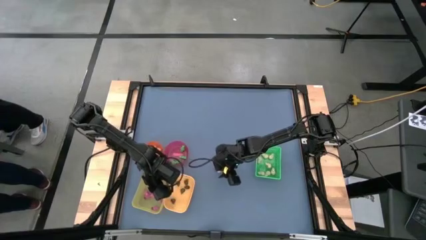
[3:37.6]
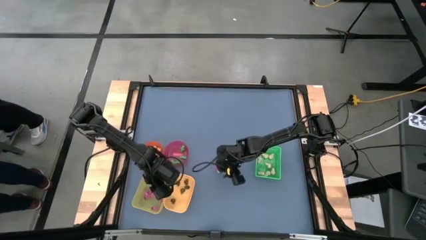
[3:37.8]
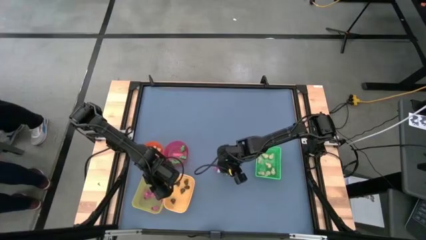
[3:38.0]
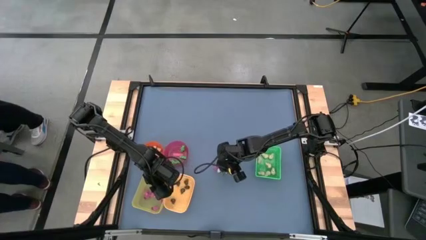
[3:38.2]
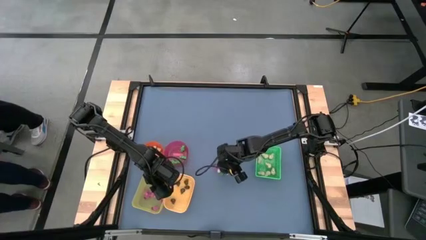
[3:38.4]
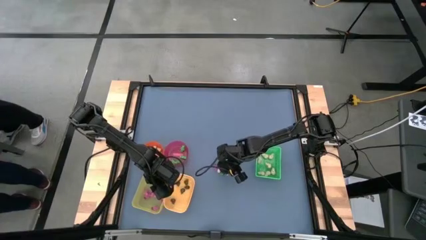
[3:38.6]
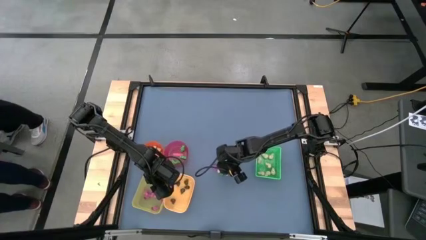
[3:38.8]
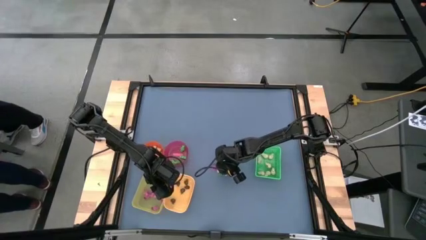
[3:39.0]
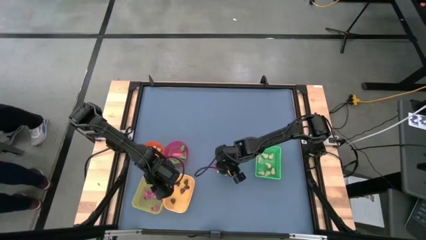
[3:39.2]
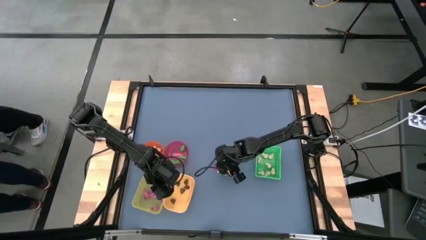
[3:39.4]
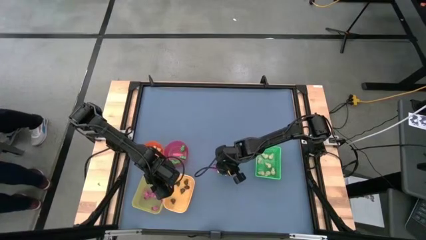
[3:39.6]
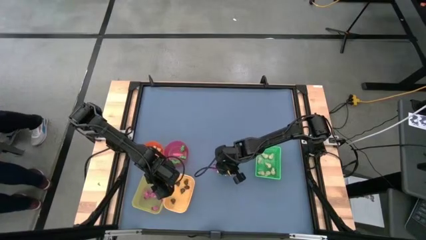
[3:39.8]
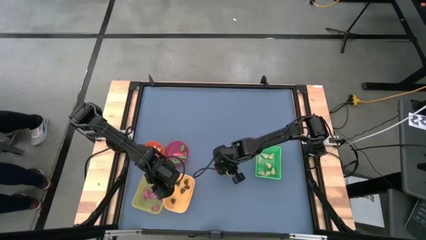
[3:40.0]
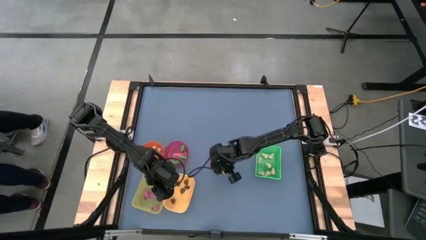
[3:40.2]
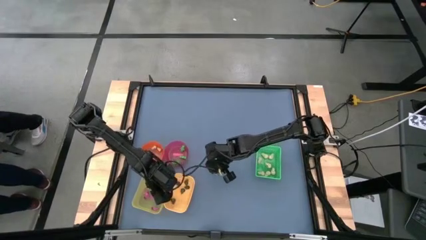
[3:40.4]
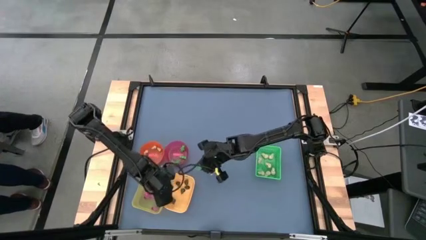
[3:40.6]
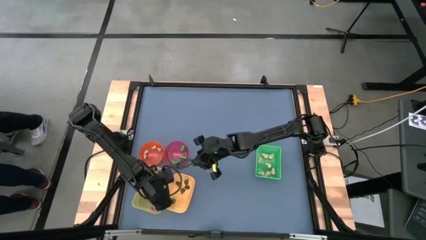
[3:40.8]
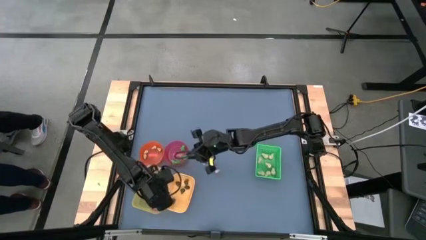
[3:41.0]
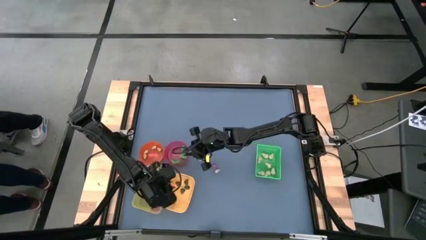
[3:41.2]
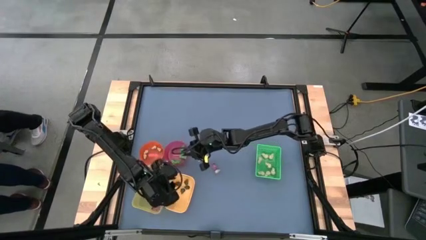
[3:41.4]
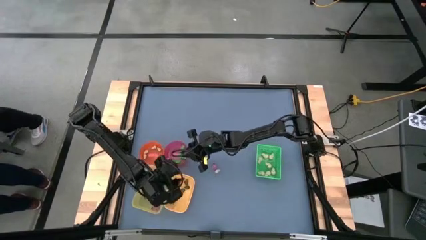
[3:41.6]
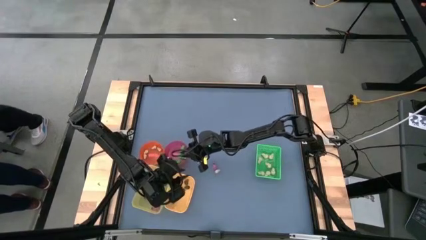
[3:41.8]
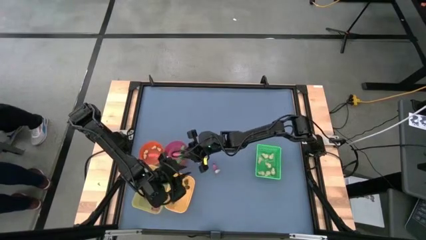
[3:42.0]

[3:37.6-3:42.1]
Task: Sort Halloween decoration
Put the green skeleton toy into the red bowl

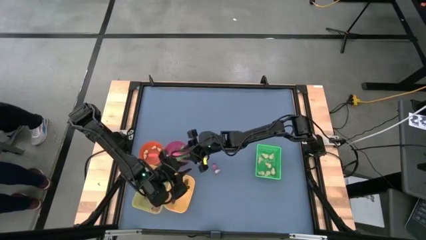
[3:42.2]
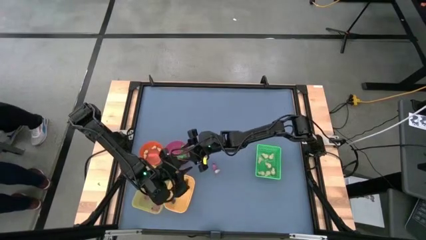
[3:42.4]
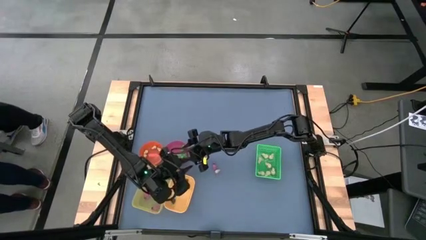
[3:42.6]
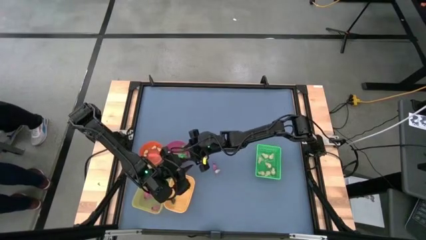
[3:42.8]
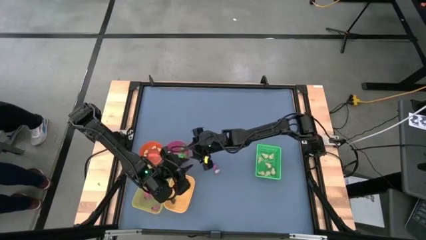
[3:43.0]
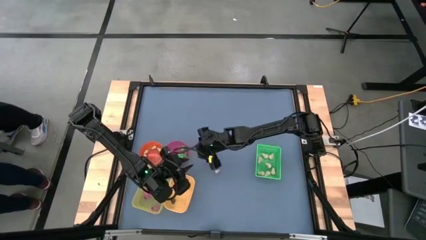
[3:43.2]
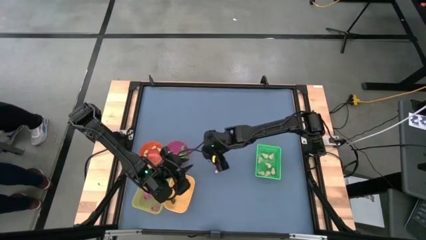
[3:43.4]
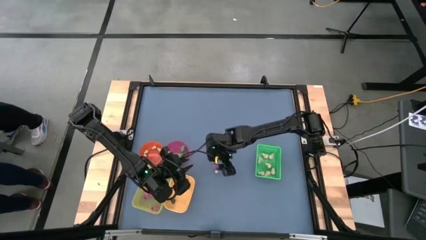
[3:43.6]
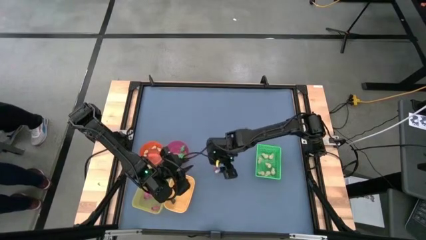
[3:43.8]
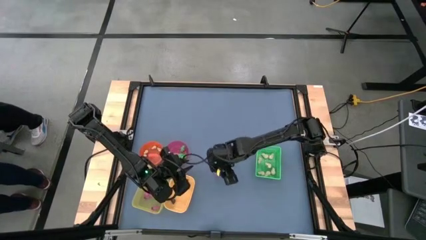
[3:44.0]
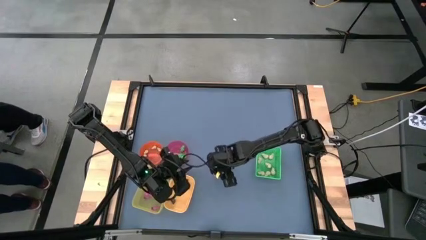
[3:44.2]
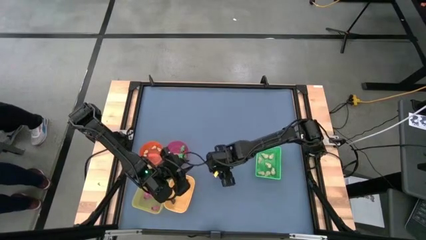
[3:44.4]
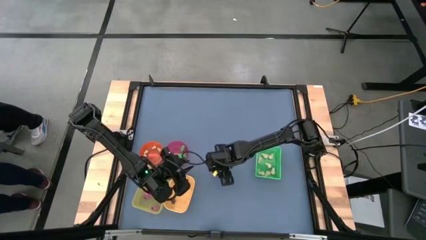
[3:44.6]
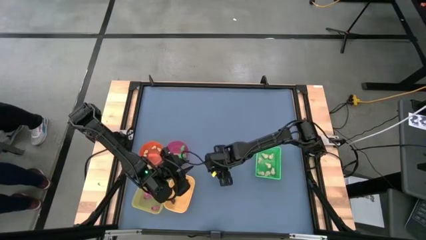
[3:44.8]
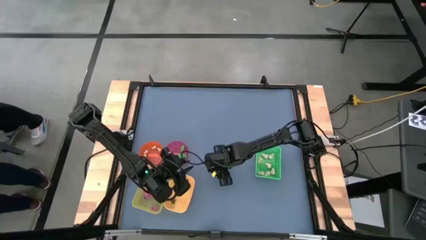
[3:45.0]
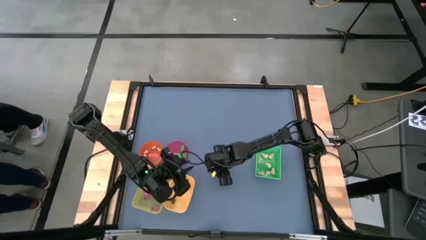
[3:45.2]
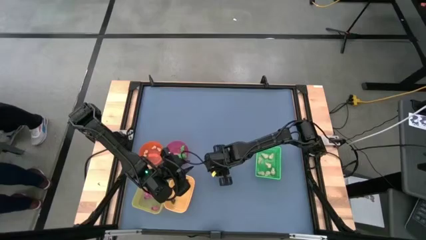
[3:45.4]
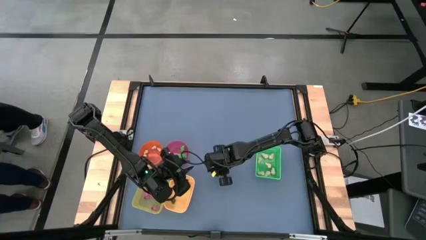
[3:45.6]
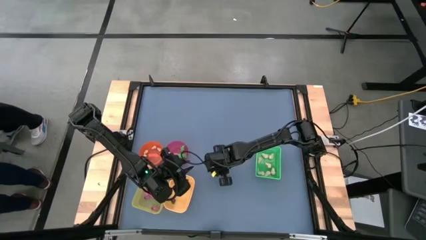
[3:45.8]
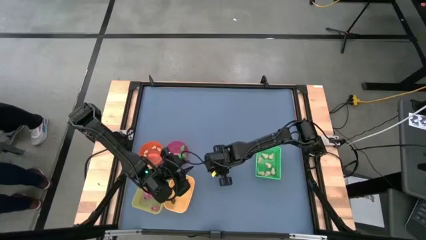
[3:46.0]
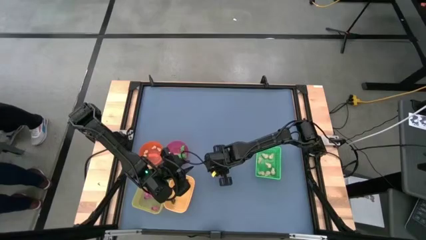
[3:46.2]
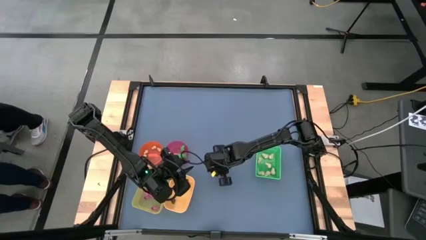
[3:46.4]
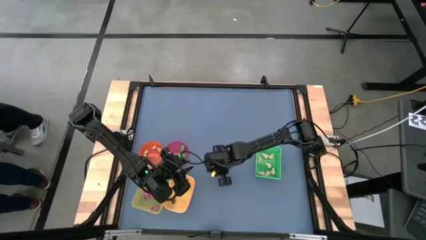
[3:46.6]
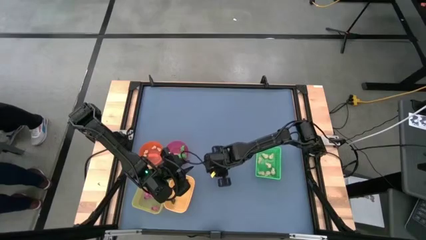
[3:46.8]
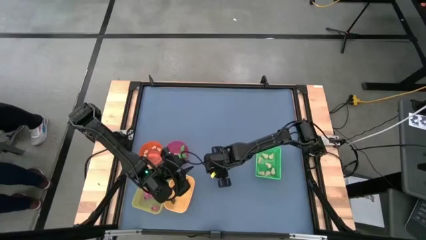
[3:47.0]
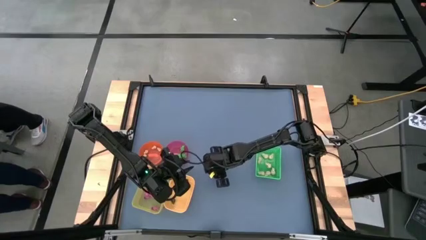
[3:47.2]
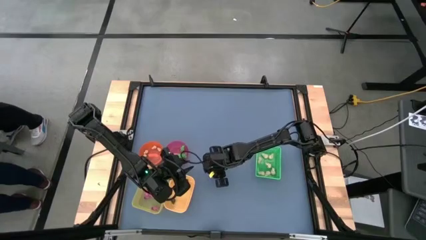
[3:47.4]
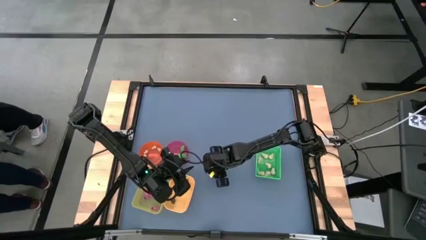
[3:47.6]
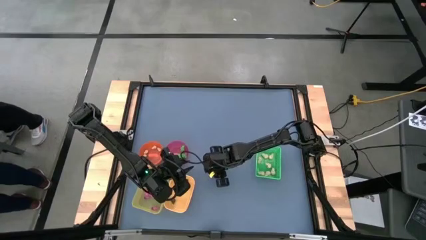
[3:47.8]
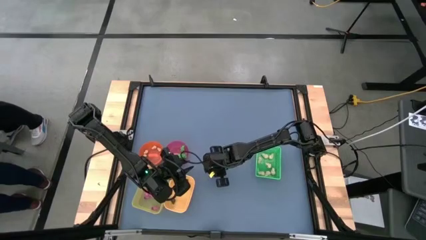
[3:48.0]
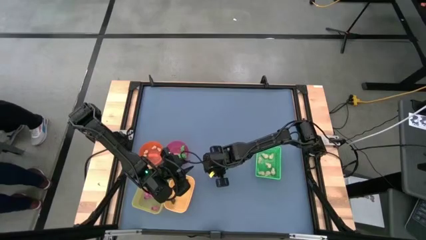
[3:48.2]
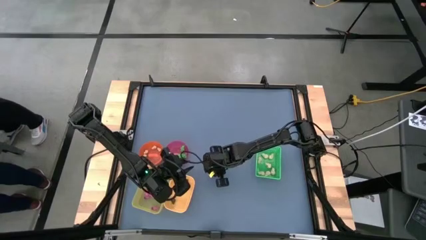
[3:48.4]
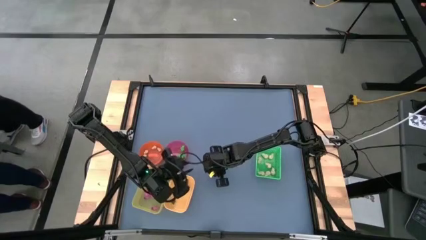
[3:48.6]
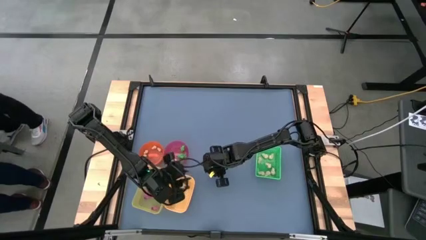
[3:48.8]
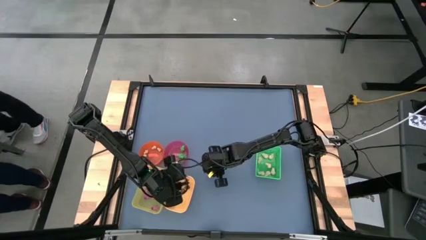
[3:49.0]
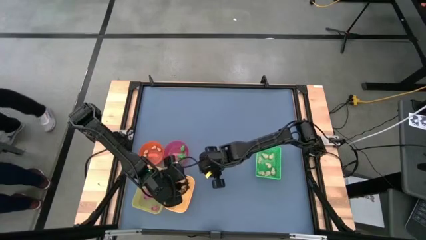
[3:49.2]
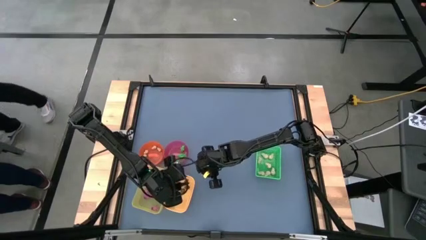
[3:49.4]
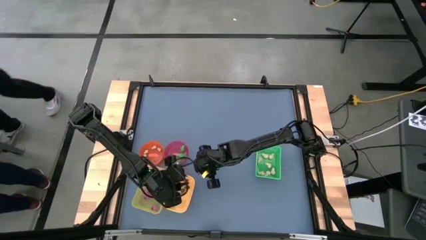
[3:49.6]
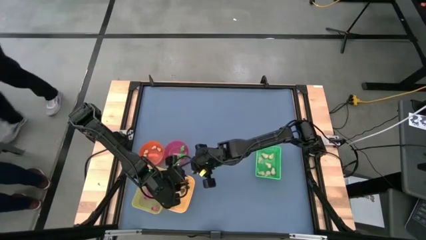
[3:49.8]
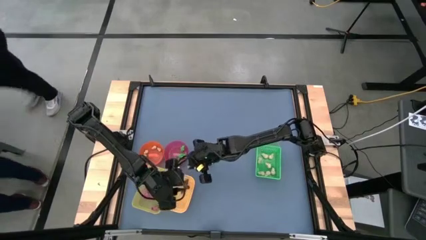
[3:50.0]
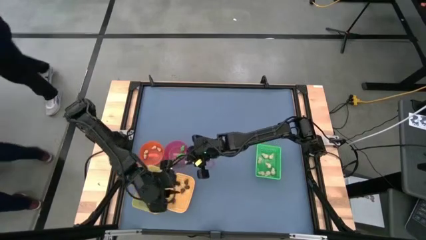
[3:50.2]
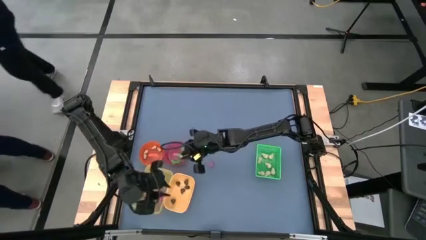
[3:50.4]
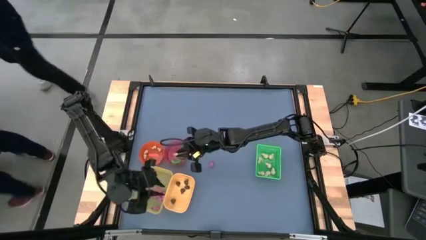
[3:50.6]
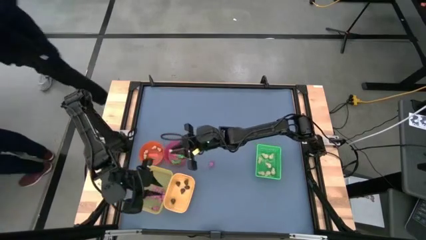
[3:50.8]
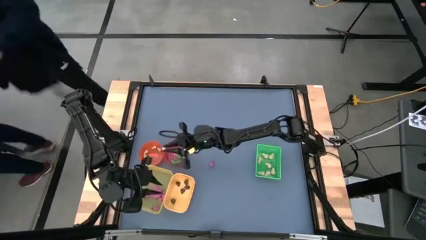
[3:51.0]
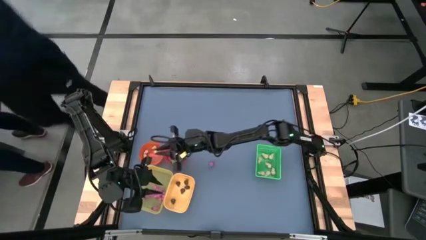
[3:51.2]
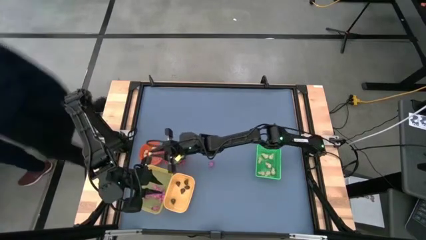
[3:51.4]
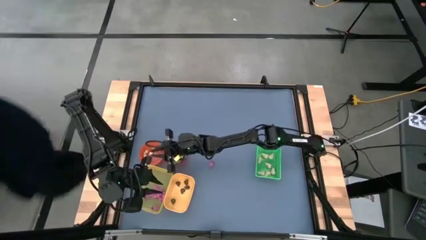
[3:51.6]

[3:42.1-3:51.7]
Put the white skull toy into the orange bowl
